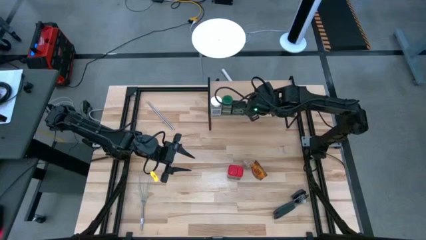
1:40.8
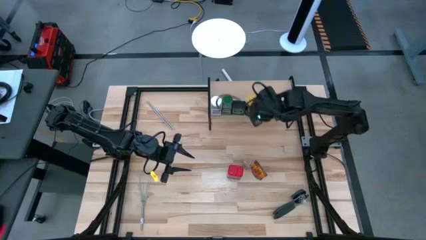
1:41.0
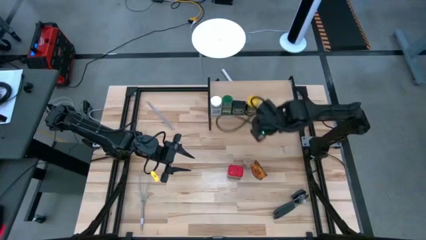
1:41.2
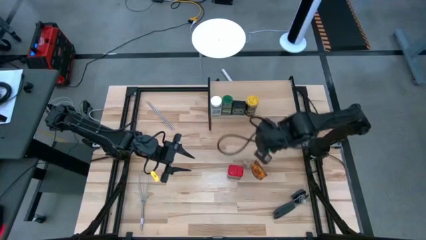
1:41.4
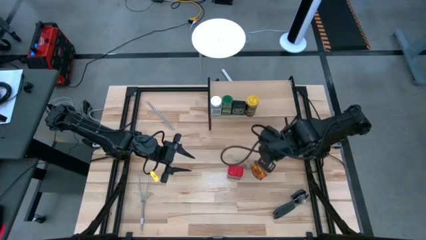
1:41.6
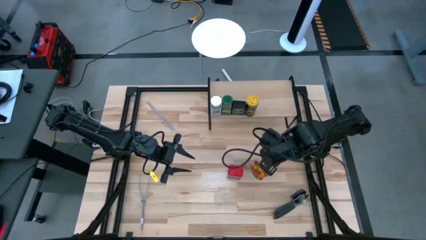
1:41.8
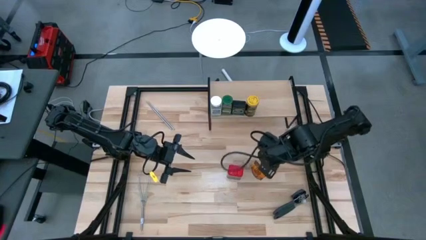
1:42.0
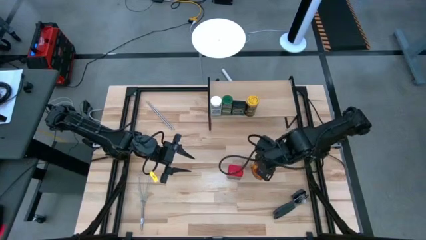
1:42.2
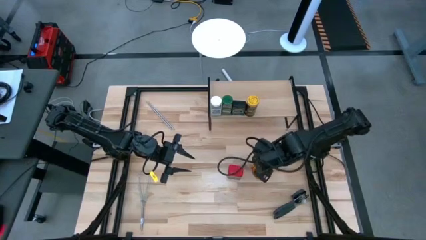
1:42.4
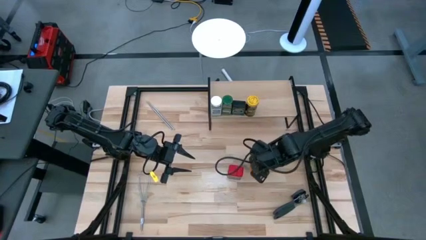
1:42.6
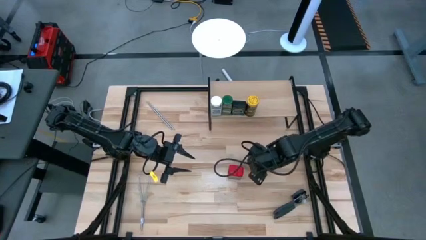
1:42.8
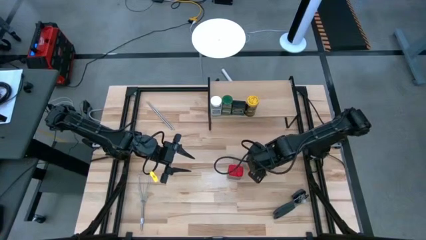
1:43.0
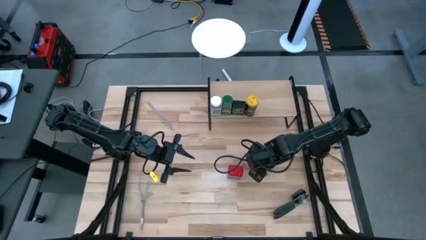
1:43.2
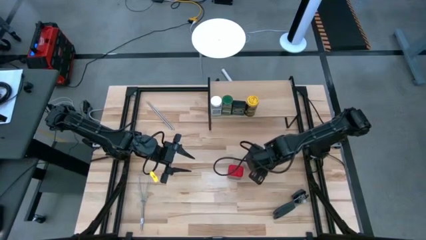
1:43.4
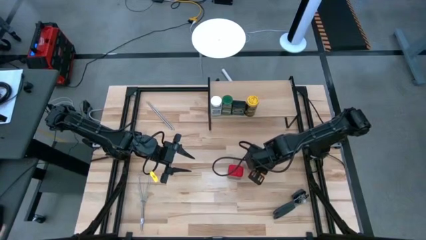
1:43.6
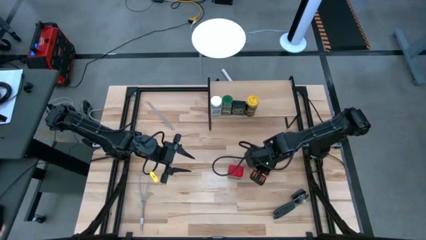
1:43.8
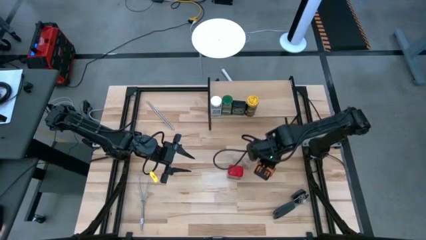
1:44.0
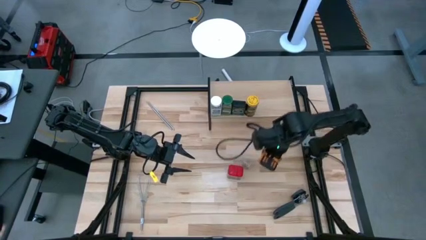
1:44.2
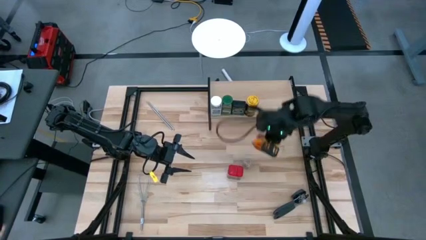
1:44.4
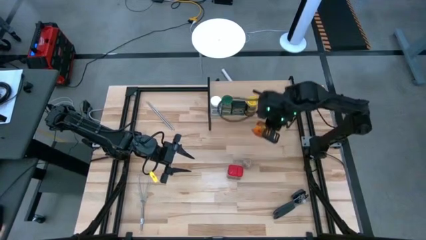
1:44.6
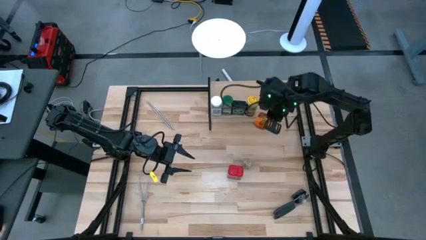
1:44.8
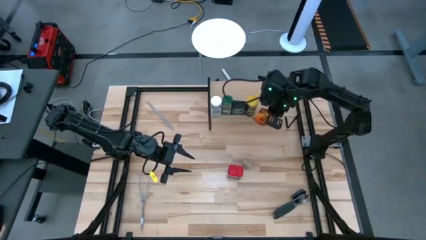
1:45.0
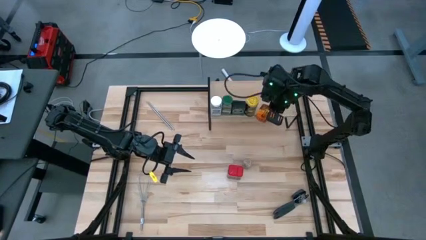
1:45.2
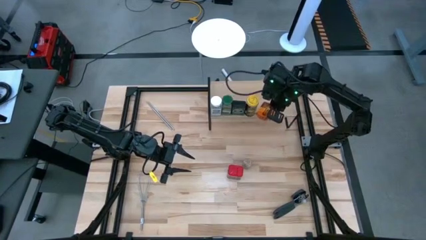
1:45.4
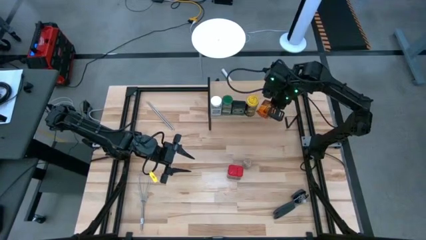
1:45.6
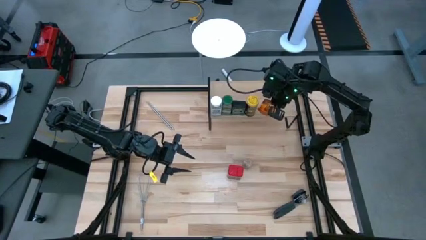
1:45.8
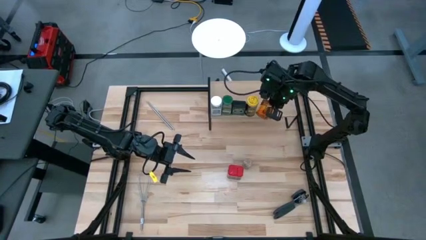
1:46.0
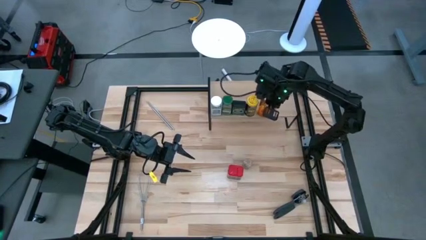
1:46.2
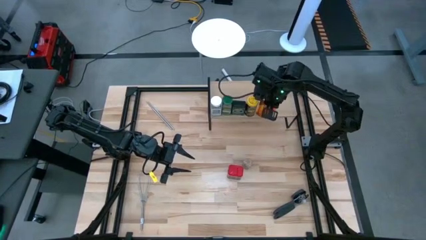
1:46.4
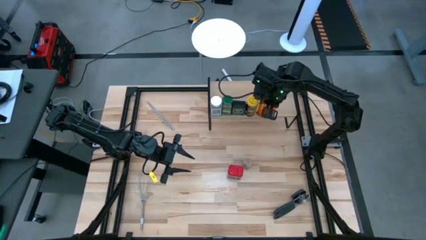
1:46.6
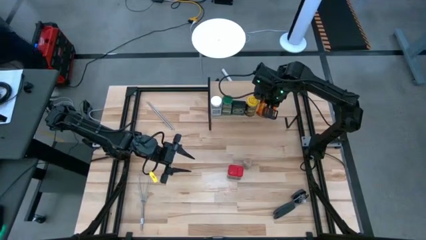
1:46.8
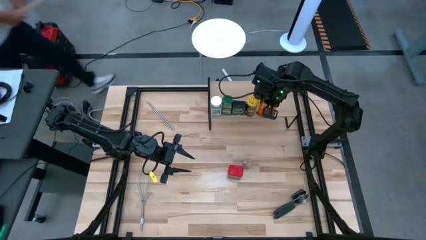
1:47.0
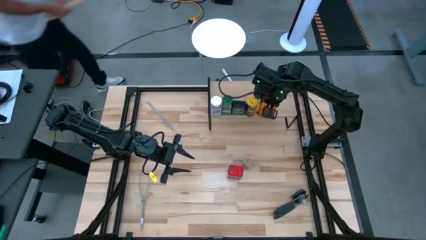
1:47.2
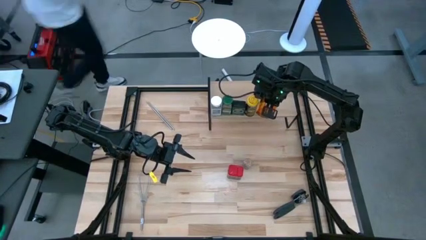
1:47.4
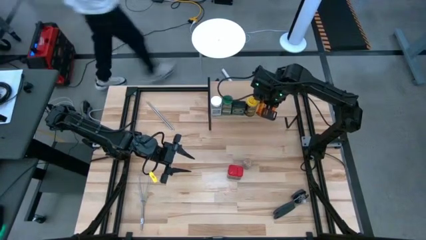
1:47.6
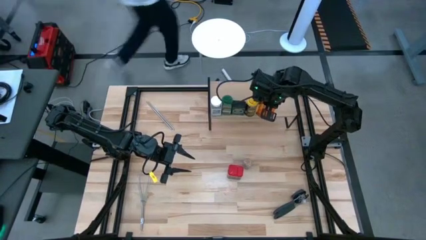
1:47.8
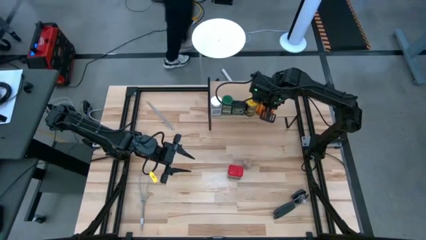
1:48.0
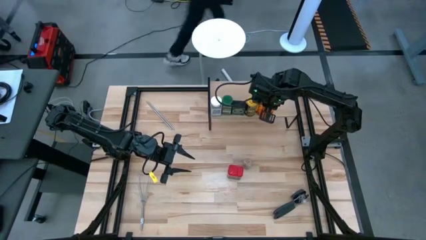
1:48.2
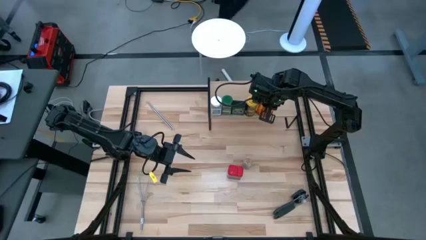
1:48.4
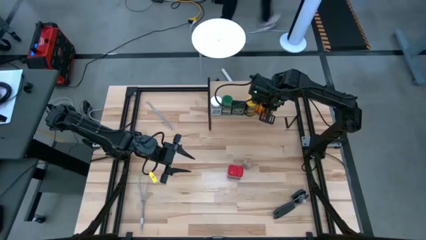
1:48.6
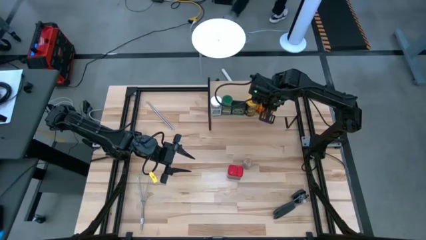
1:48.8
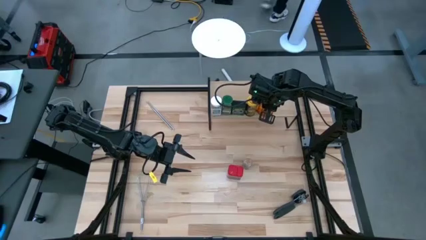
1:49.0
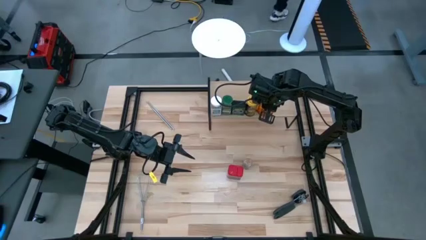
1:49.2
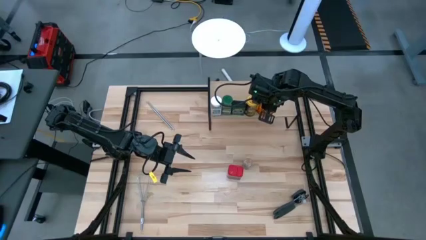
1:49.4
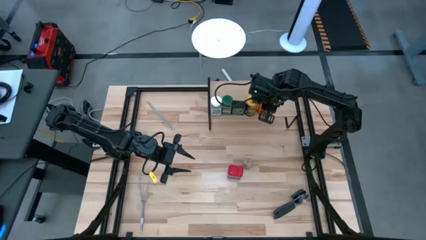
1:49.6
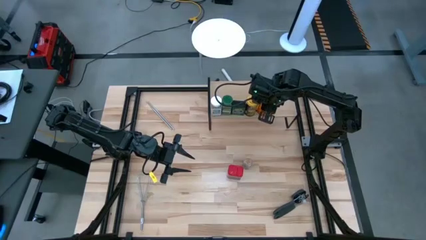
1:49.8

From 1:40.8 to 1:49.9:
Task: Shelf spices
Put the brown seasoning pack on the shelf

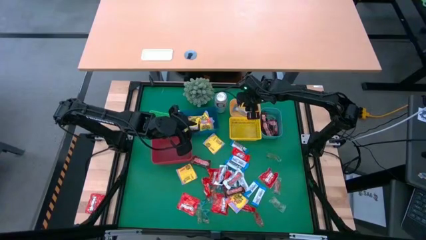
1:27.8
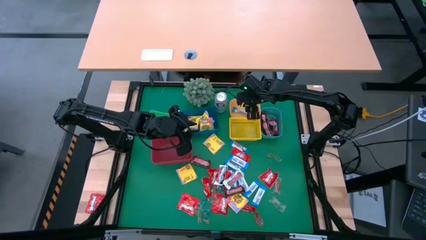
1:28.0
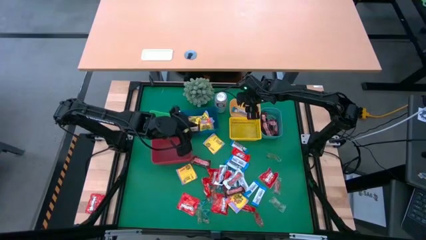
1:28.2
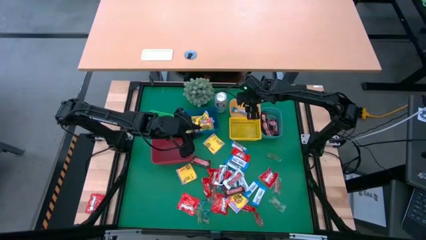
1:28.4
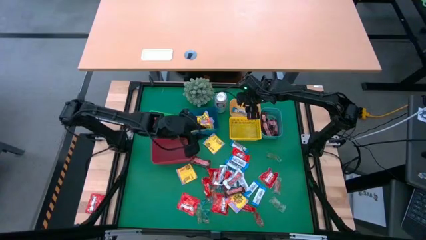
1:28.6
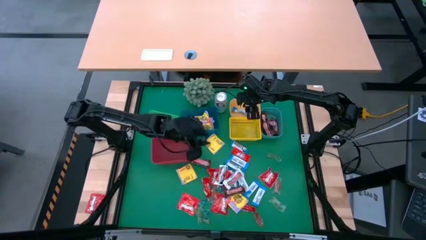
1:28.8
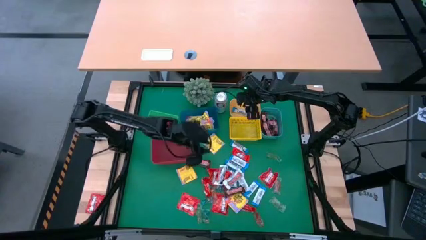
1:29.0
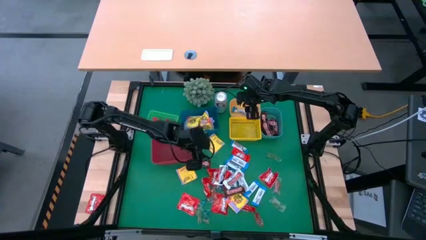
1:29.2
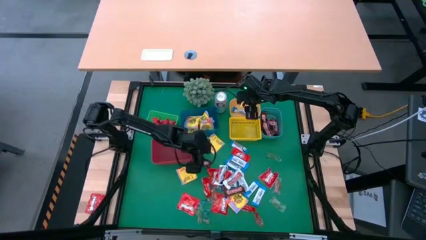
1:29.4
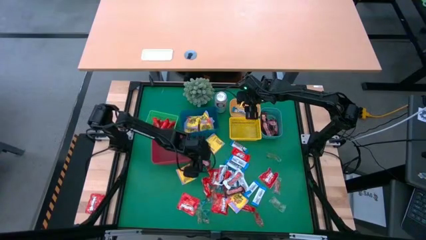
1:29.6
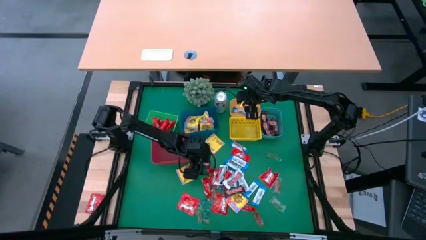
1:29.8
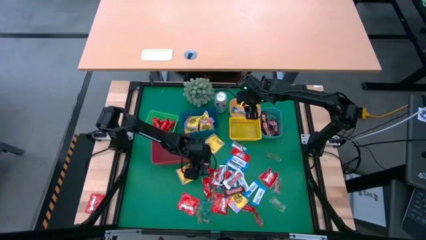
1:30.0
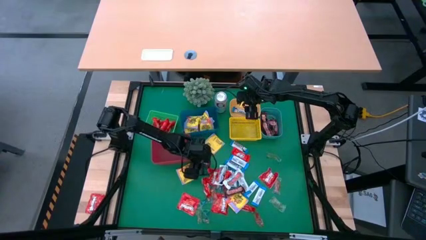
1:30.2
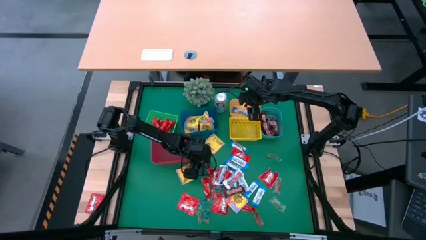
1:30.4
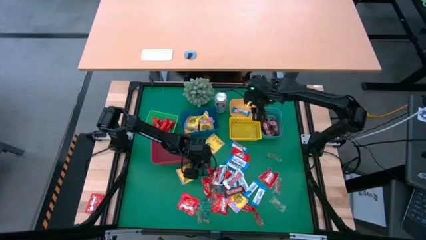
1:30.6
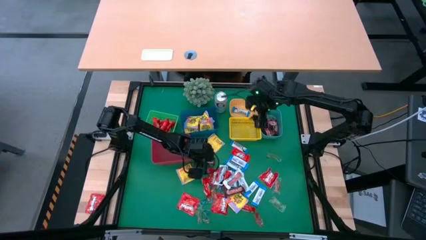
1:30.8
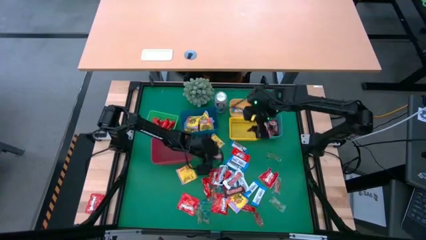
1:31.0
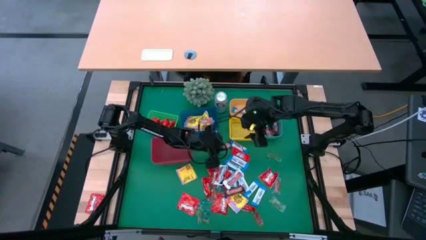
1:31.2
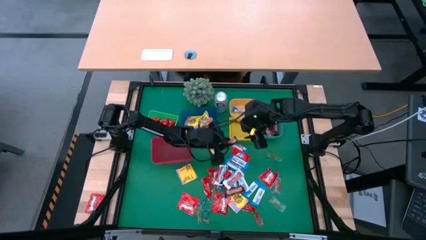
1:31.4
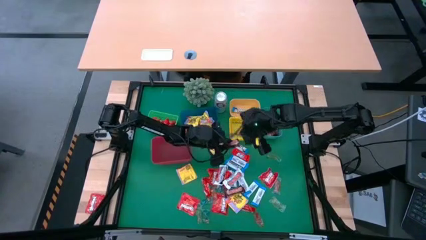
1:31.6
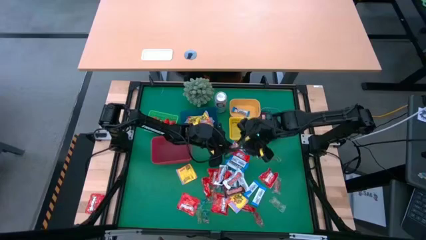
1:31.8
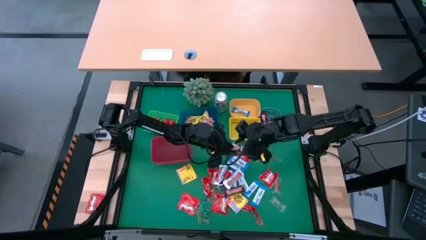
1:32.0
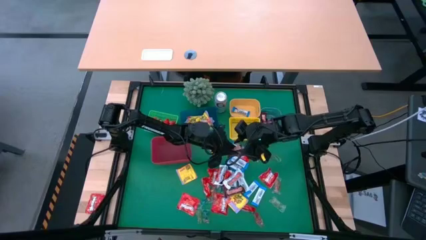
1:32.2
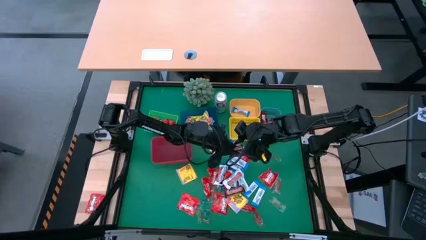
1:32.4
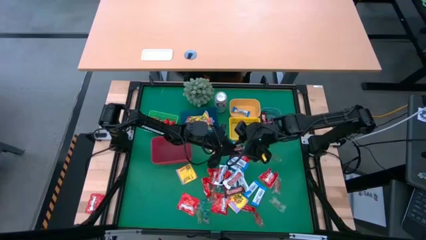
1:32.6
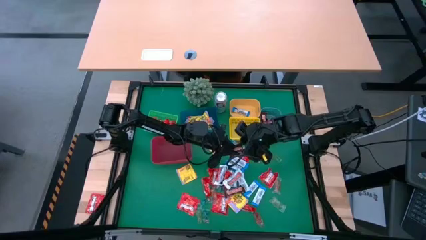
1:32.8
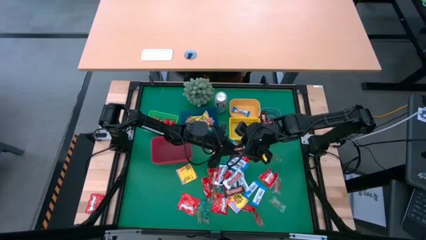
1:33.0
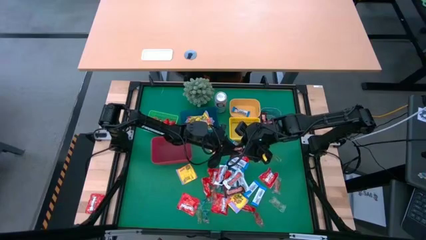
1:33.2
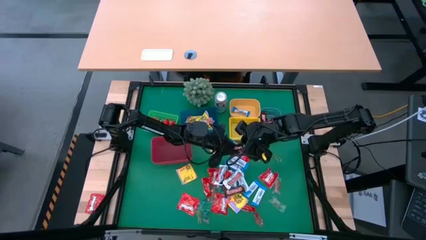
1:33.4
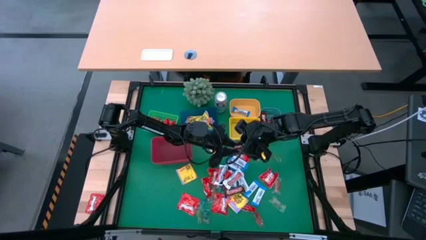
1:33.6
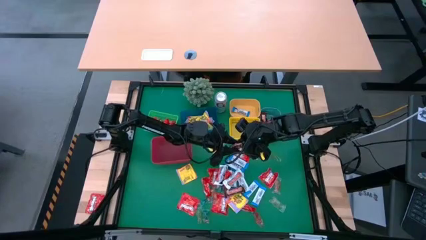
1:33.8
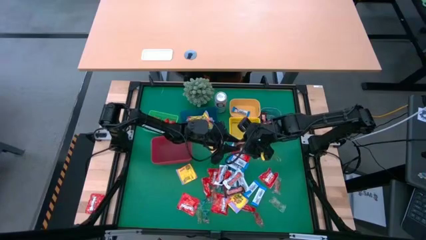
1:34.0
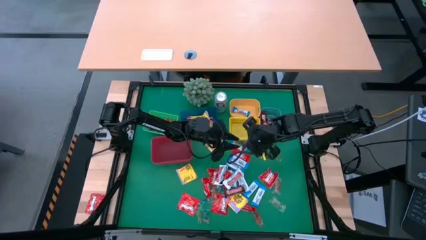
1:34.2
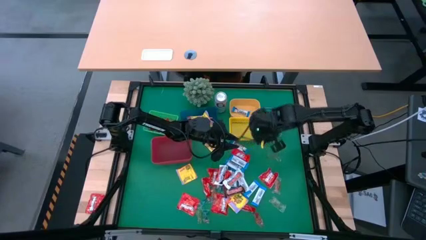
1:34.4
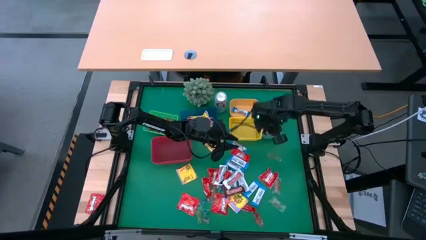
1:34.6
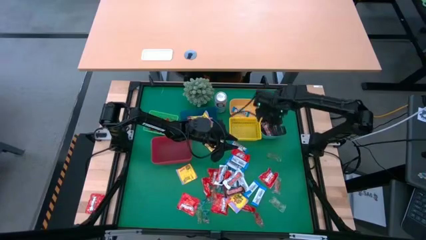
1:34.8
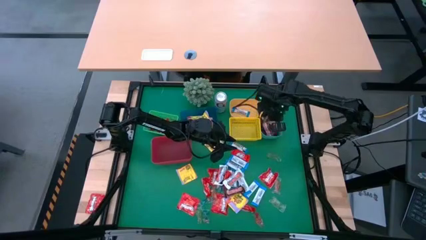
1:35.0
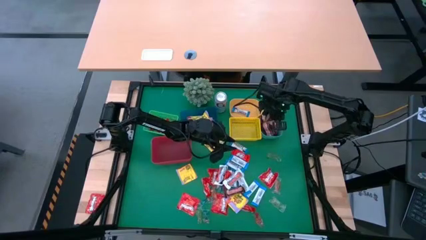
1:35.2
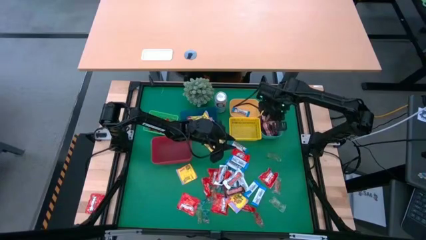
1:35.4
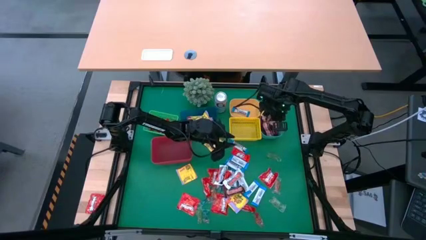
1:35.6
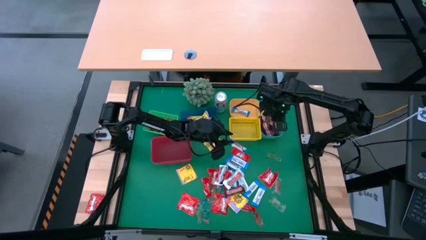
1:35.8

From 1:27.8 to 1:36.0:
Task: Sort candy
Put the brown candy bar into the green bin
